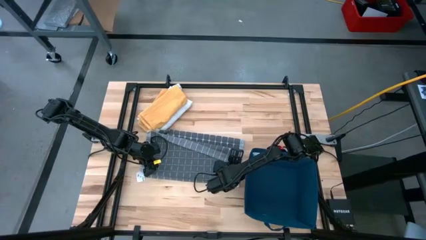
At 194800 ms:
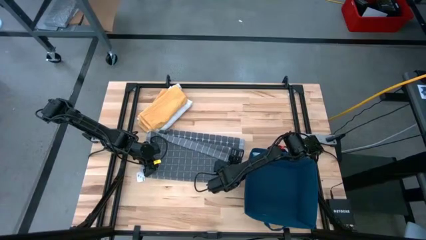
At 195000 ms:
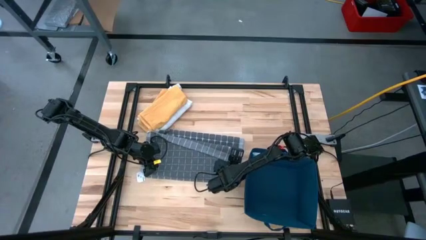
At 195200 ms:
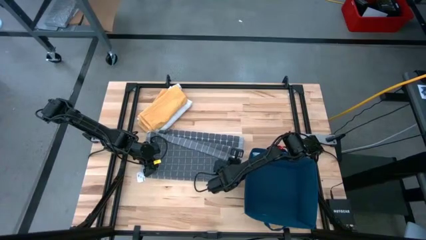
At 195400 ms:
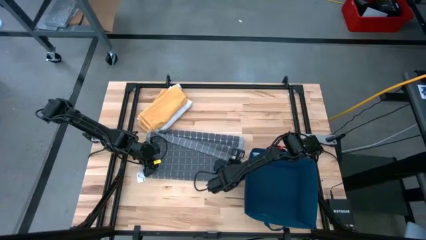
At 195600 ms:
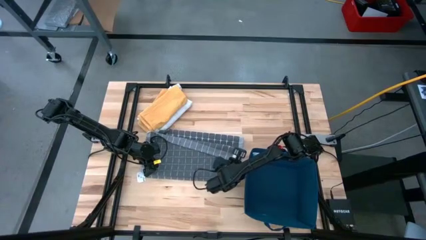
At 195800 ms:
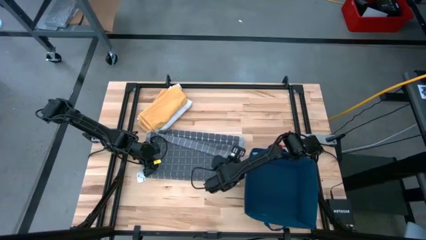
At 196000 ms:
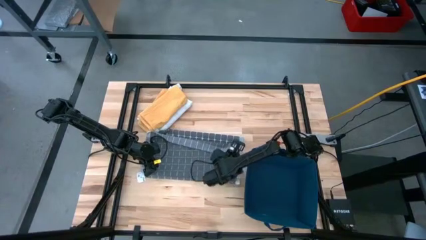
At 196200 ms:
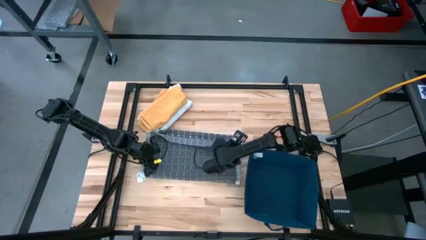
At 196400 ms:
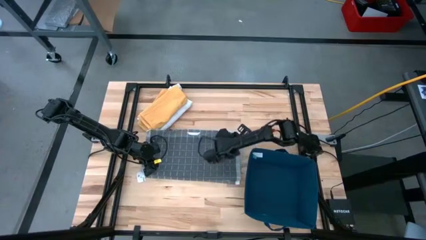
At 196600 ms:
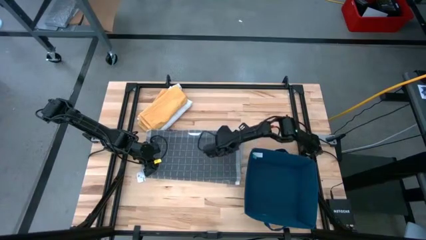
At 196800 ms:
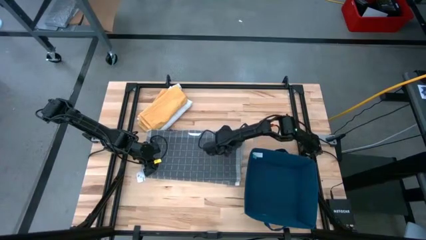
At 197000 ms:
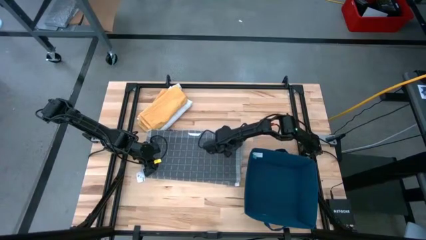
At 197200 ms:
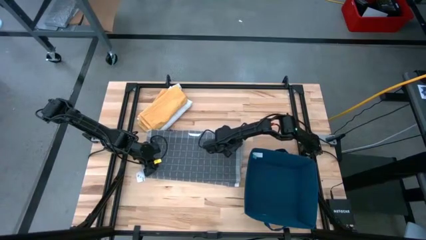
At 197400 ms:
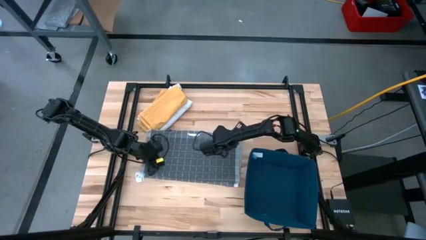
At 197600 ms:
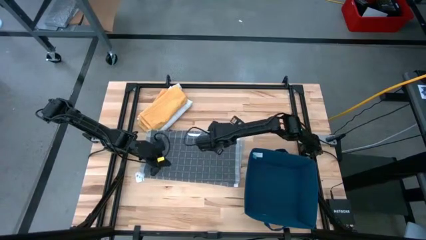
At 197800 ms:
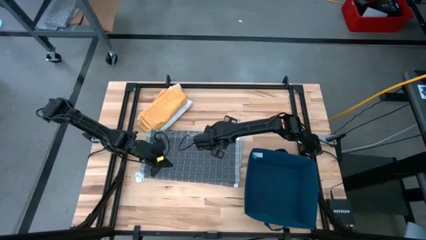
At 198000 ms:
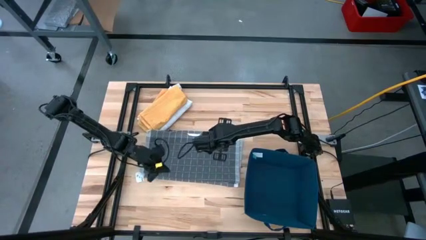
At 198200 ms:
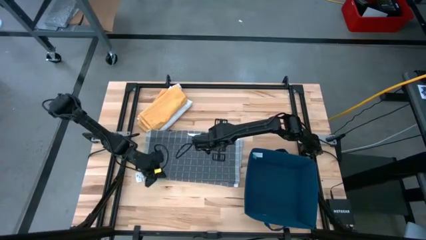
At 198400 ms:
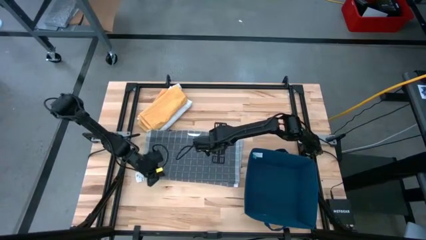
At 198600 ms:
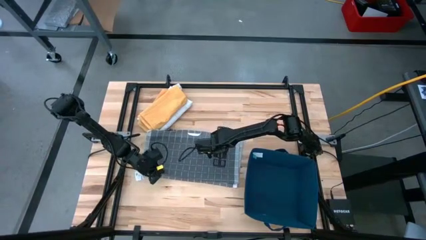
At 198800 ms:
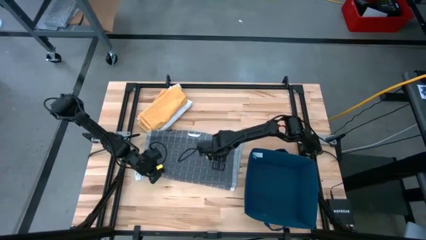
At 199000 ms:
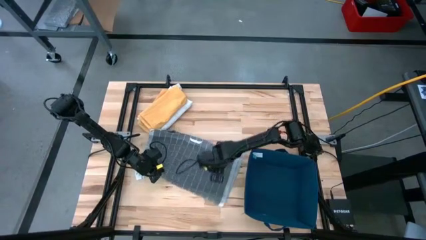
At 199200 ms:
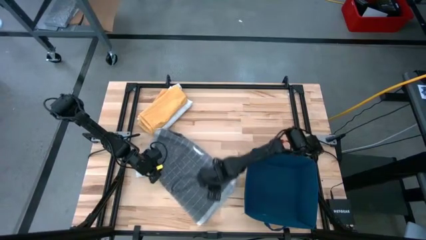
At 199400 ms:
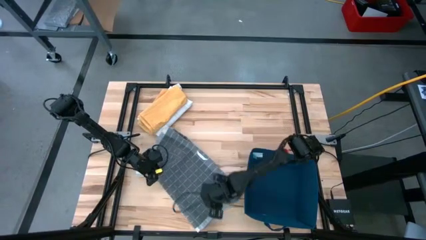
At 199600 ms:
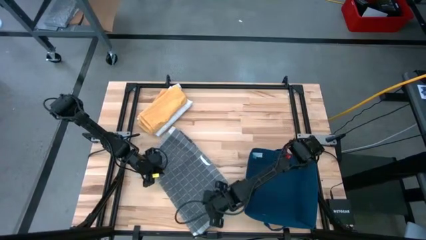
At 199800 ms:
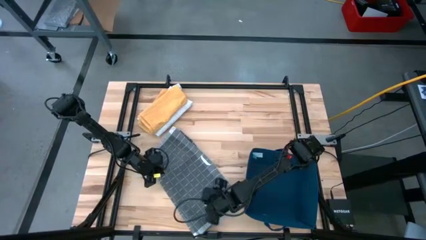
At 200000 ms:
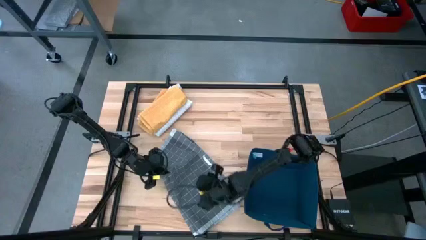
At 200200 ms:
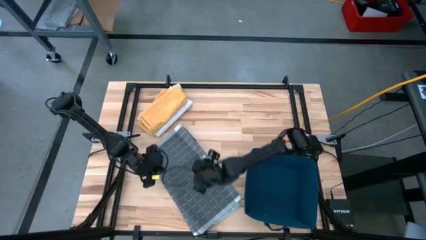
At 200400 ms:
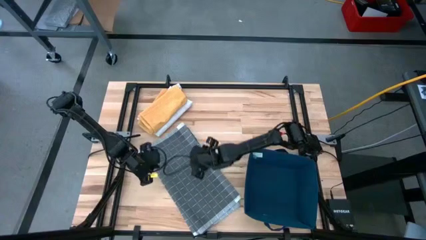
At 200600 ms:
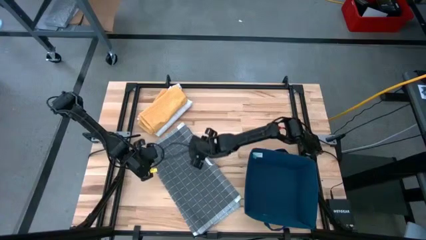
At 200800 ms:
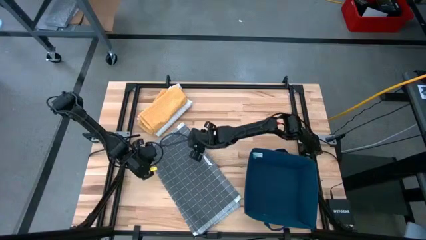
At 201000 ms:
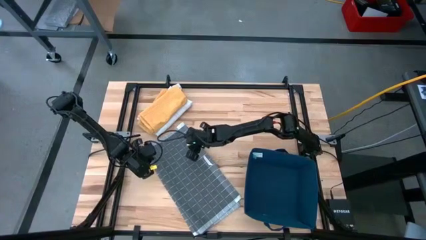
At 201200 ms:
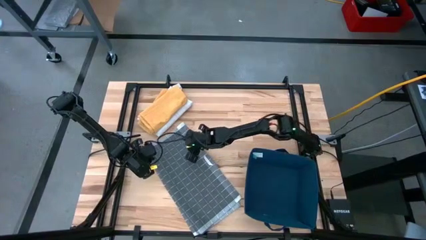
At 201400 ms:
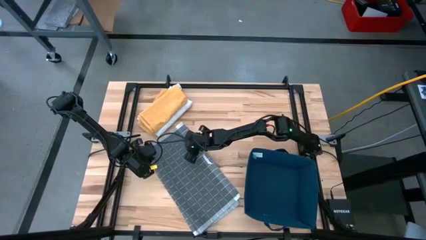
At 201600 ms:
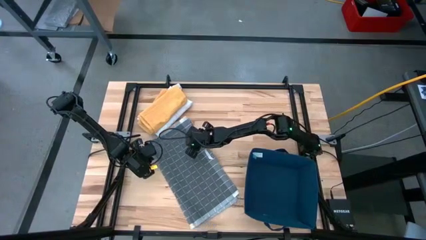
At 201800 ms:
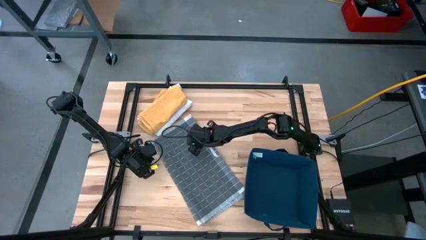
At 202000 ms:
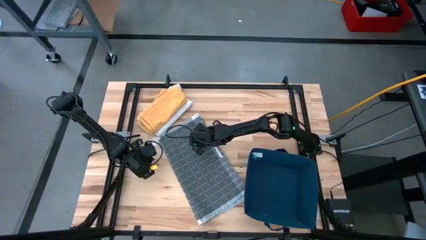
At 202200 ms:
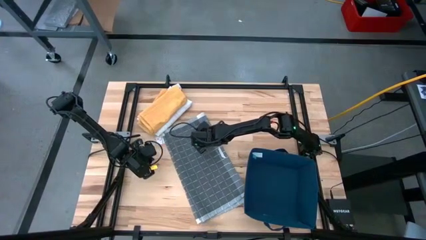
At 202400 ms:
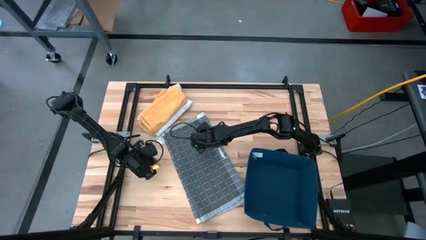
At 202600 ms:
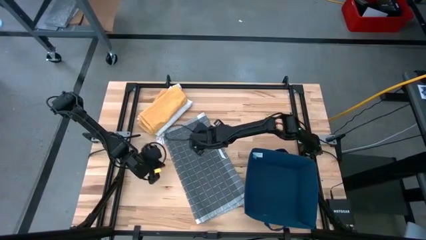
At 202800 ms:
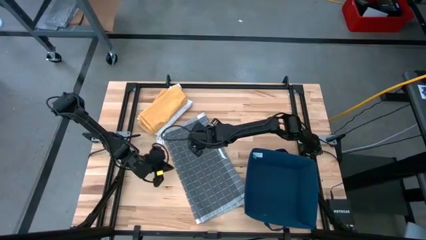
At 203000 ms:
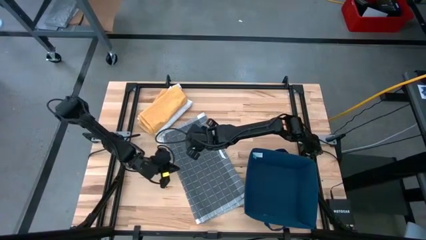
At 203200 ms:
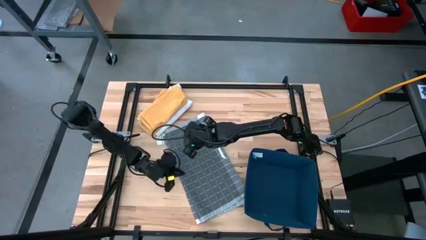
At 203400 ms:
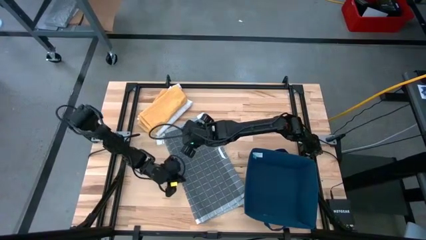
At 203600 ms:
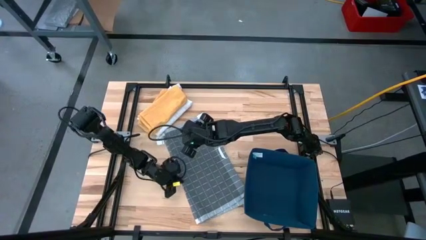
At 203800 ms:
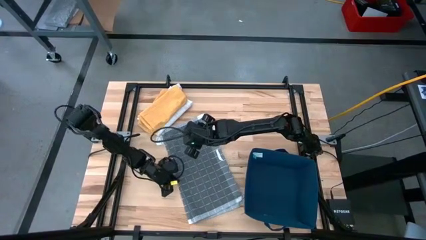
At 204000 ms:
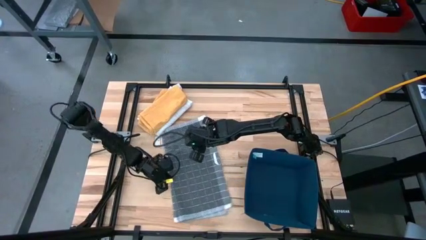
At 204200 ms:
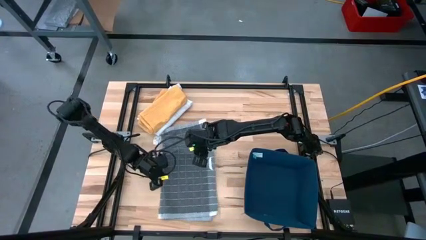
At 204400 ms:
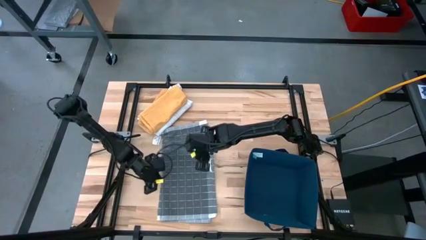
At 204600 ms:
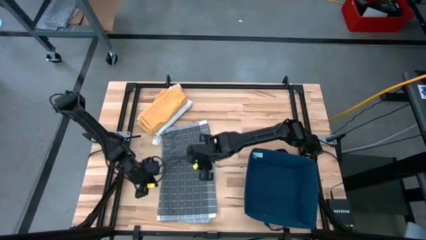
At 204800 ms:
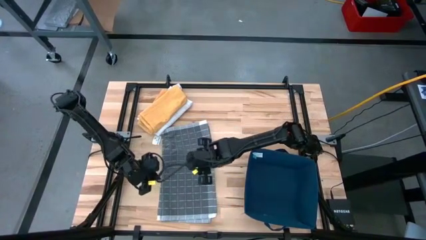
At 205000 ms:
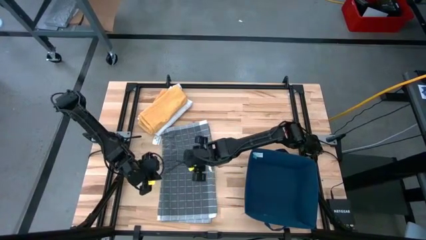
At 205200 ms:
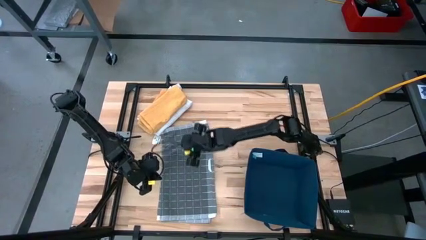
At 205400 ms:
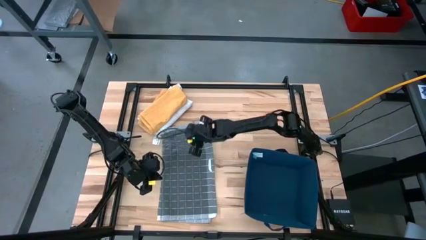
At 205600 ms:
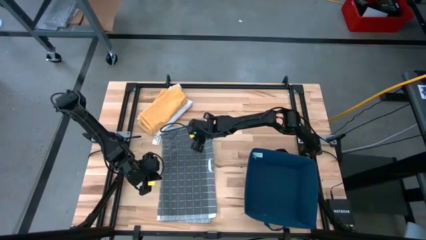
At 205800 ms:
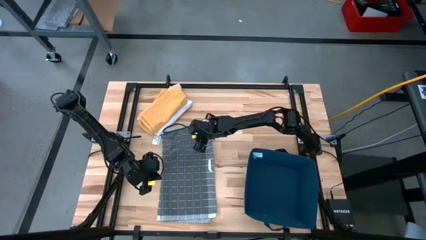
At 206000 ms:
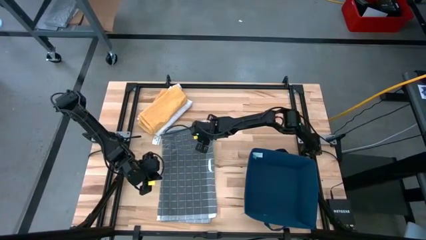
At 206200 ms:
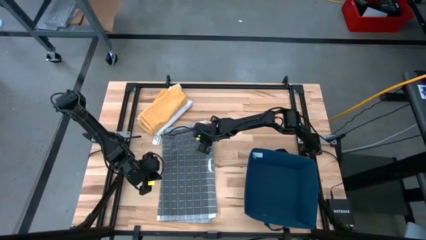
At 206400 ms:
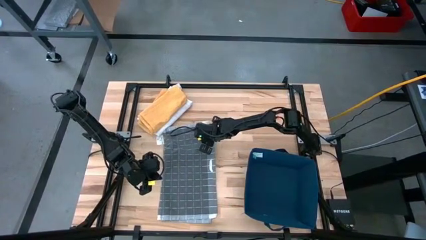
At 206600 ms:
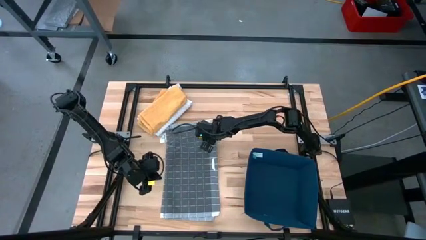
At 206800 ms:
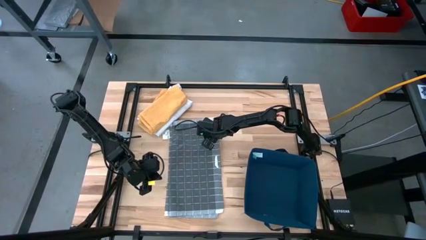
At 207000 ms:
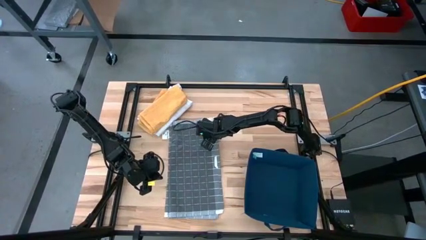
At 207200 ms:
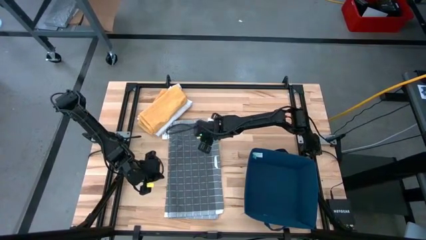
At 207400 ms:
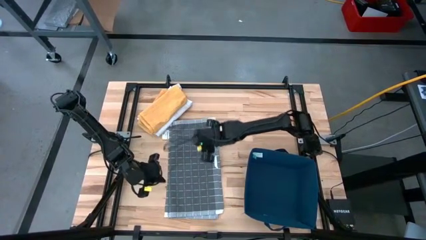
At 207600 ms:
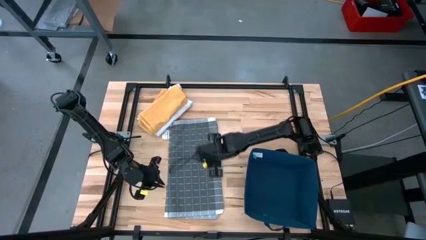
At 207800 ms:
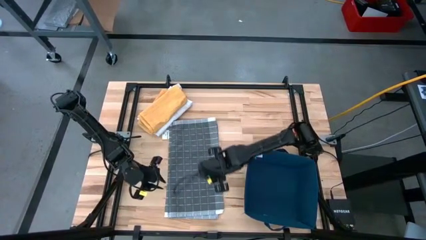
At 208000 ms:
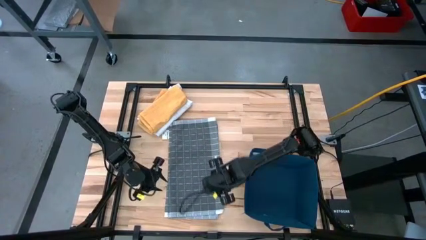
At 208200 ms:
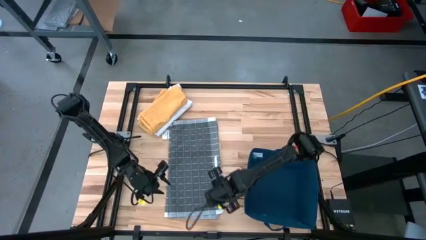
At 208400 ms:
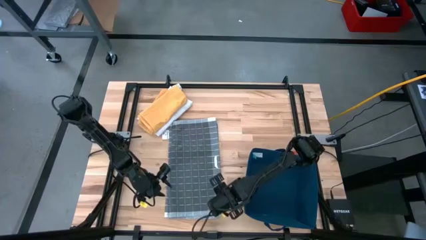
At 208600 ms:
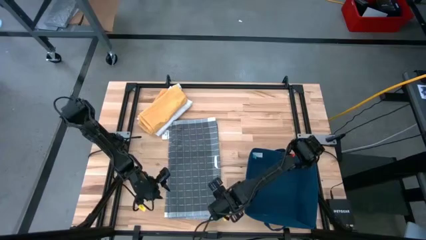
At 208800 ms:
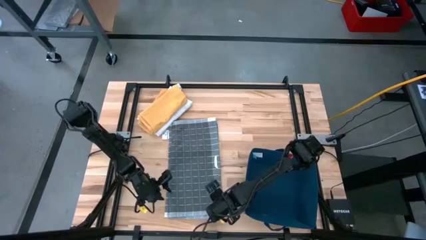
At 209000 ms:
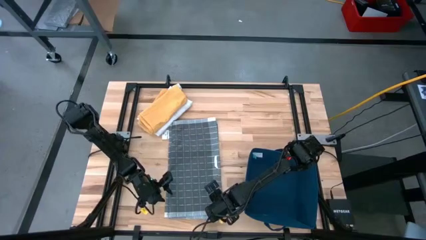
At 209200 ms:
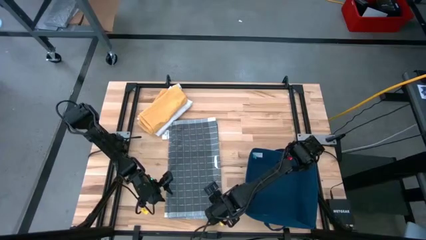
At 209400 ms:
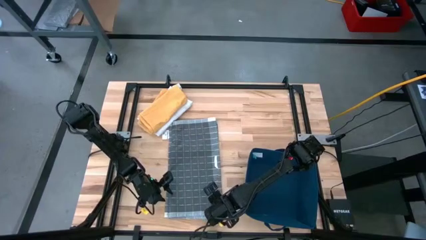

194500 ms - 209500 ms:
Task: Fold towel
Fold the gray towel
